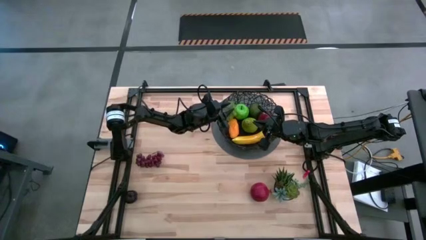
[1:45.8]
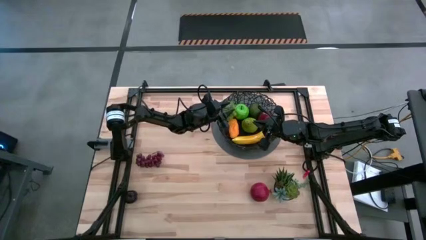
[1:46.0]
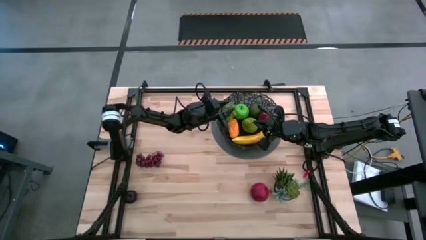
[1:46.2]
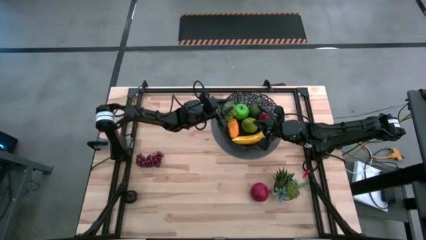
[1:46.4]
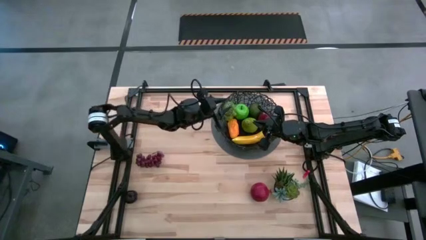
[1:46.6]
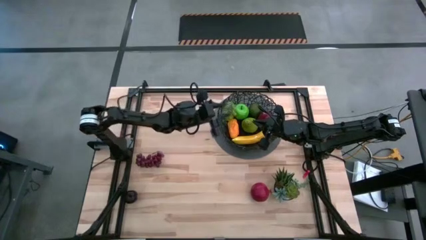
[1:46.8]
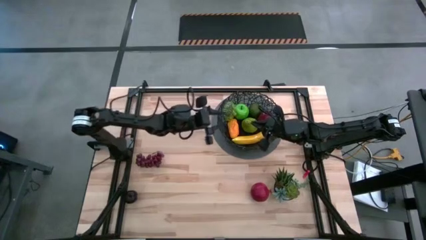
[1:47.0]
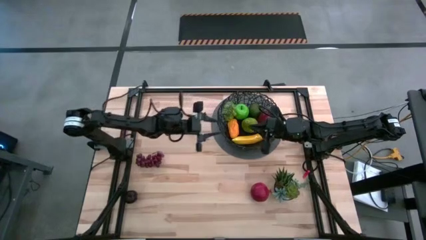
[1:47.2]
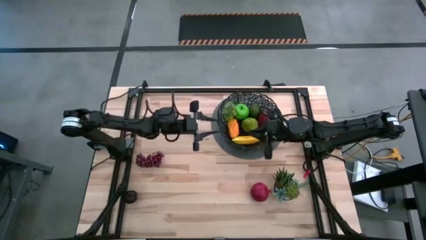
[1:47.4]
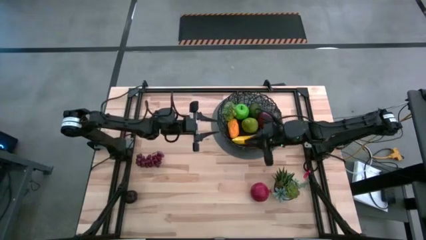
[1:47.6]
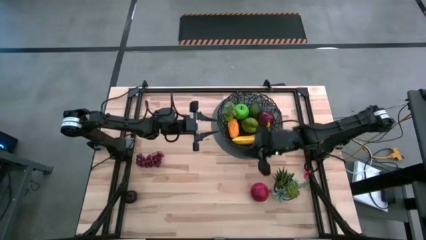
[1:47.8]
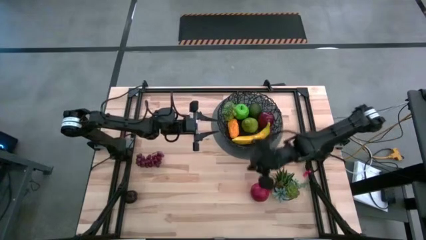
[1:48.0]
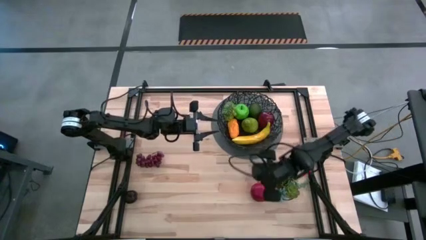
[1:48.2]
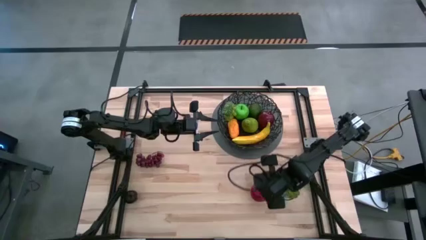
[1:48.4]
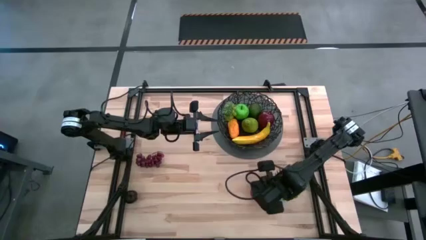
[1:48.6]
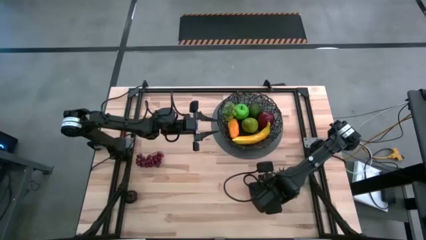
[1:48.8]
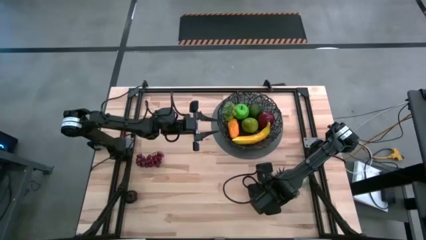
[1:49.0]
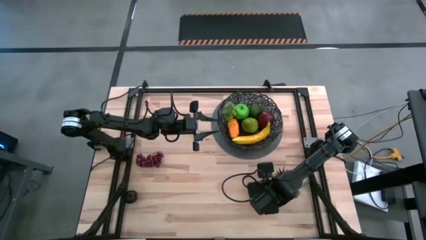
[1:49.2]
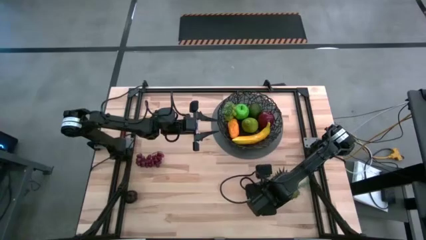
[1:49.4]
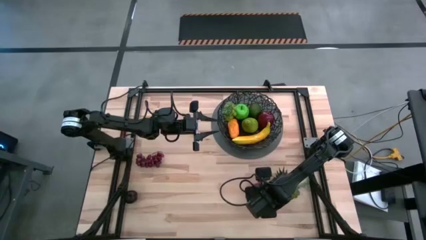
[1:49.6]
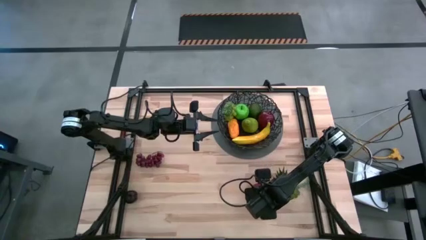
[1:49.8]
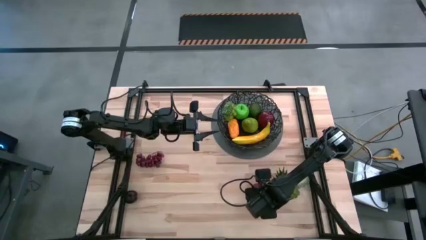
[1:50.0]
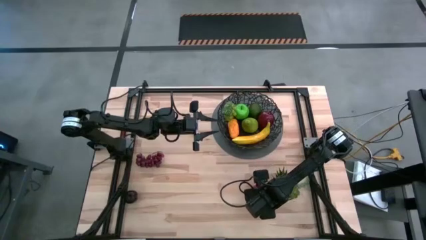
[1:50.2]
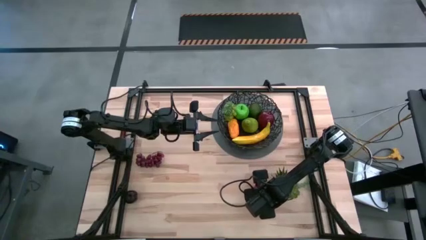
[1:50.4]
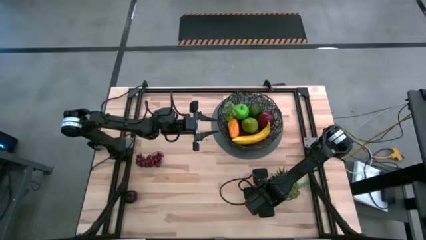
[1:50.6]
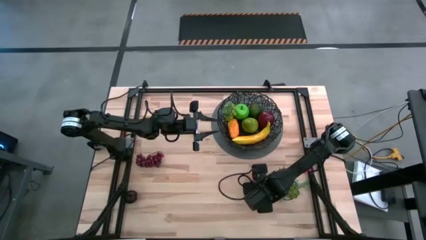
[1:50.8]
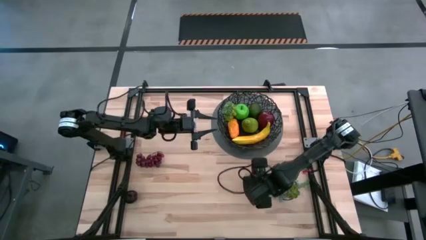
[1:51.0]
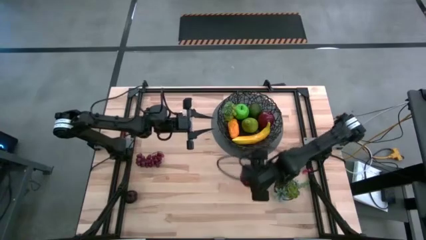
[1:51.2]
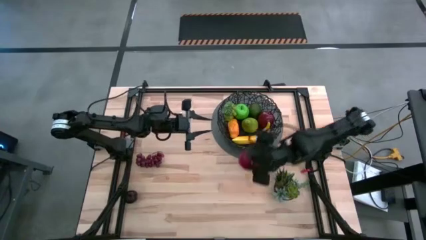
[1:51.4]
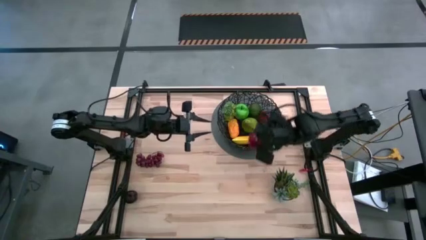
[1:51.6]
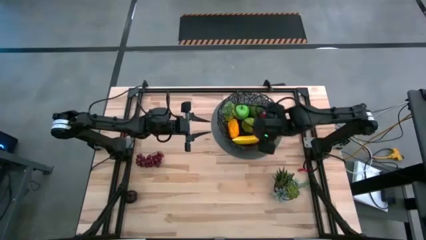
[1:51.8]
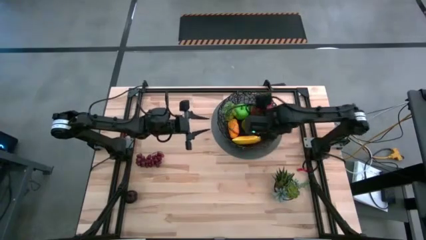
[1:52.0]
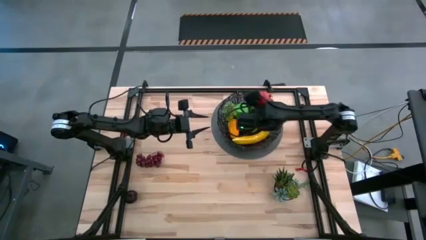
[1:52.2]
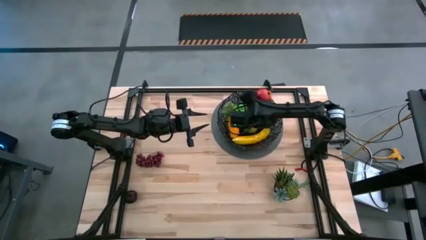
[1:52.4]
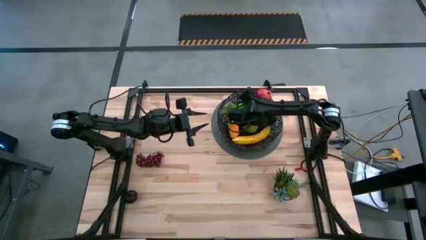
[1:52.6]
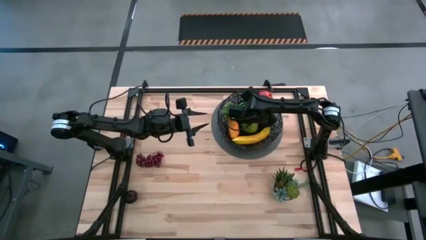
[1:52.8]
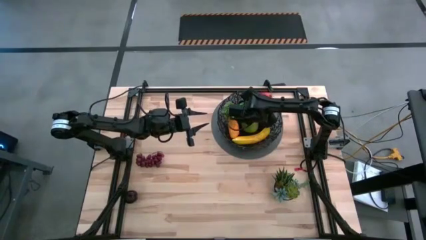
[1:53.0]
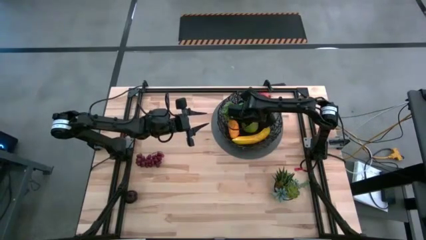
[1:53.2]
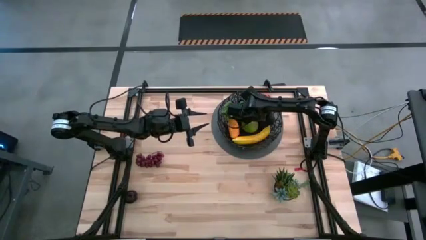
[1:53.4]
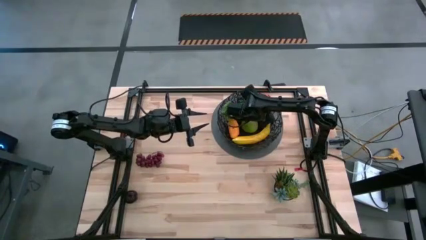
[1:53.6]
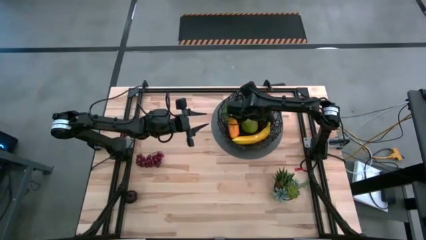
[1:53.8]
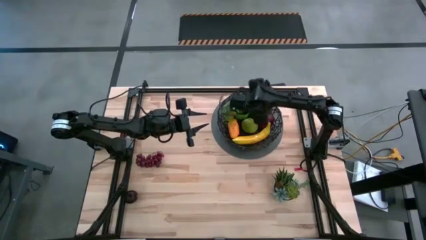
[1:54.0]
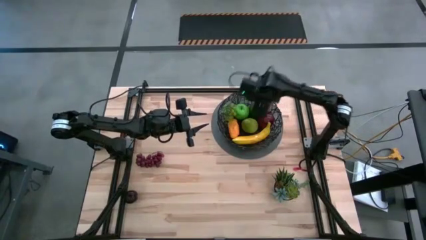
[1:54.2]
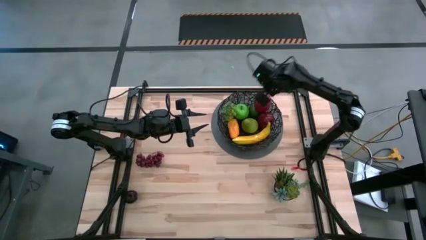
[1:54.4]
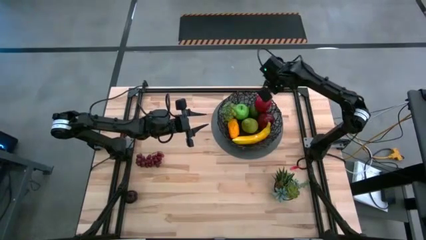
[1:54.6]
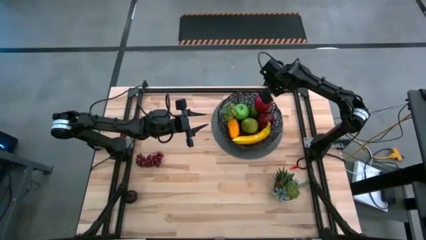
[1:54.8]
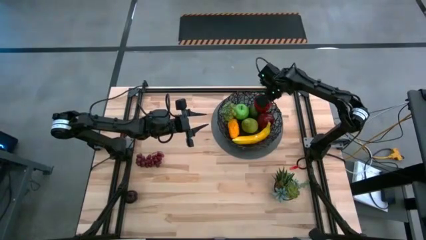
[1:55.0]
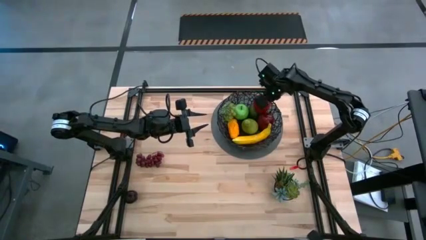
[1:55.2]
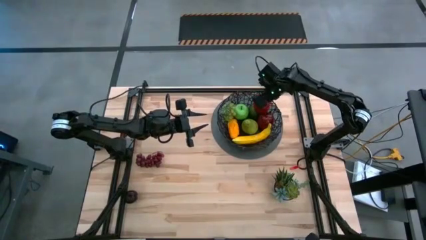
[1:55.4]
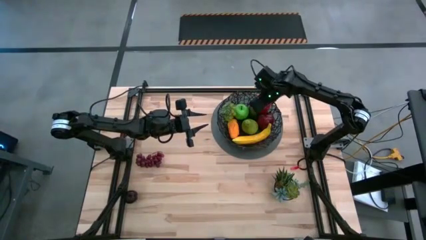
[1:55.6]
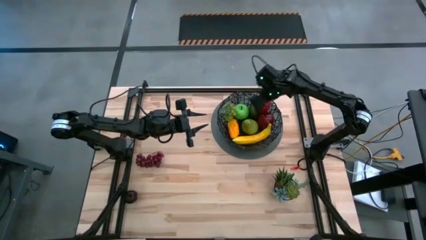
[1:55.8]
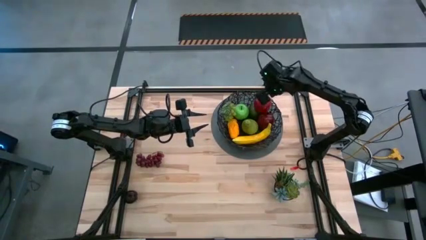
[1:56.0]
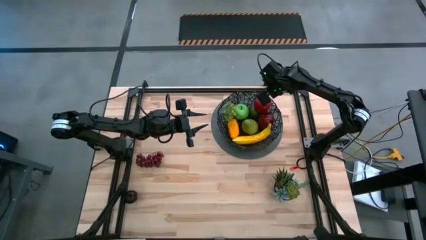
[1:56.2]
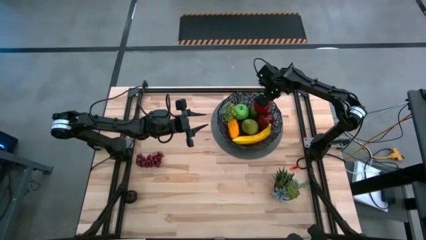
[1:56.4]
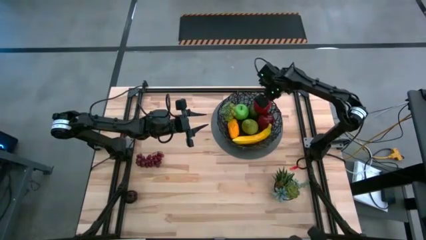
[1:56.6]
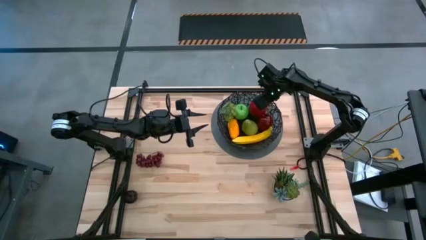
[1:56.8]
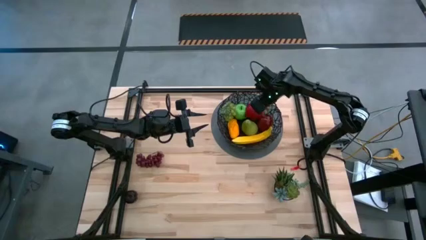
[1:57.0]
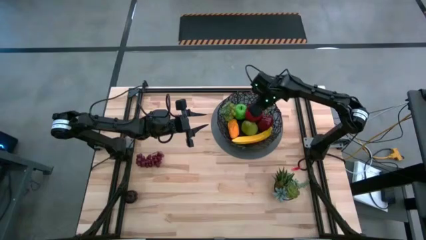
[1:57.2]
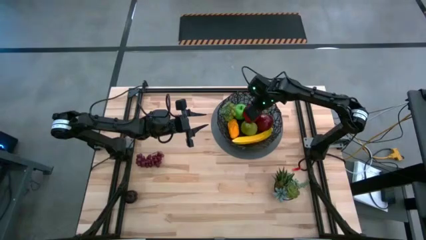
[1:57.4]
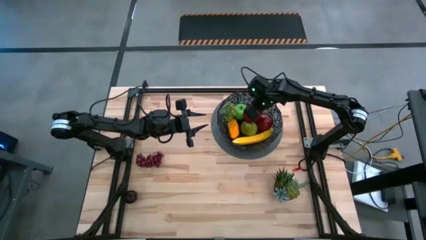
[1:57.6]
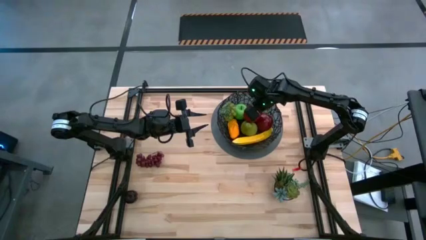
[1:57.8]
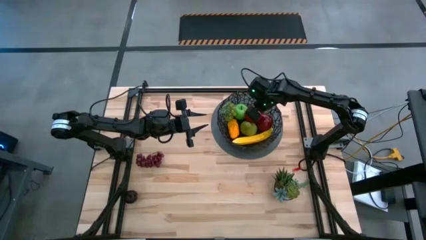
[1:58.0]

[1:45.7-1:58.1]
Task: Build produce basket
Put the pomegranate into the wire basket
